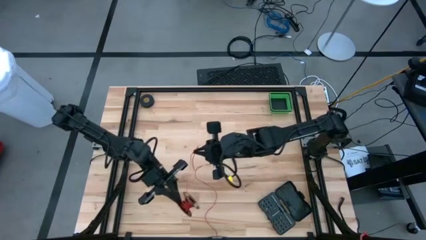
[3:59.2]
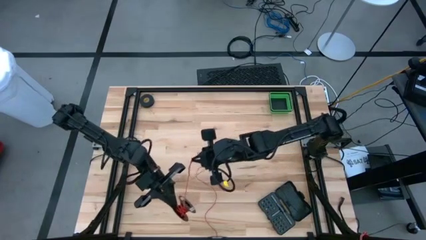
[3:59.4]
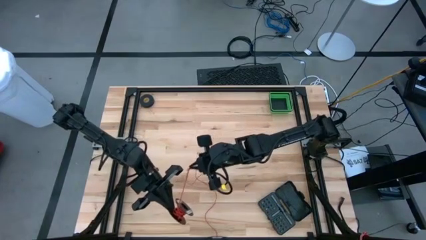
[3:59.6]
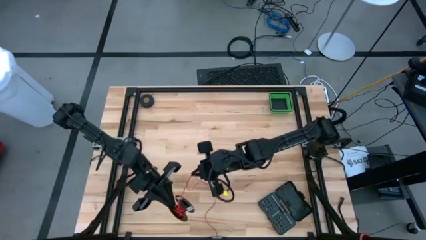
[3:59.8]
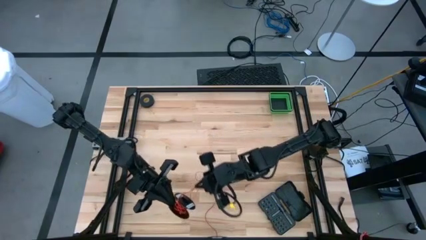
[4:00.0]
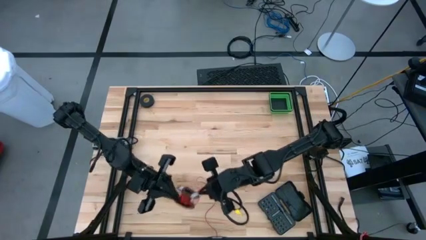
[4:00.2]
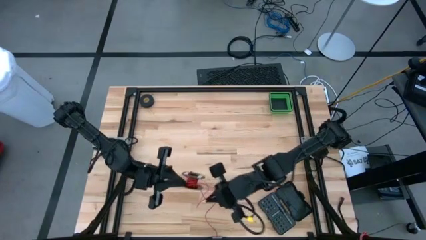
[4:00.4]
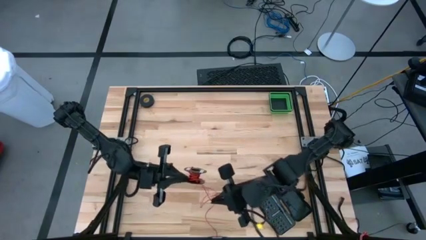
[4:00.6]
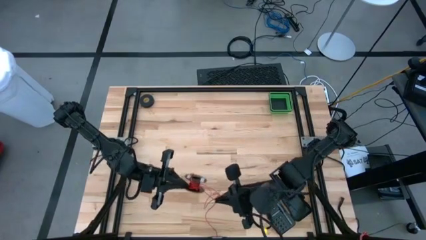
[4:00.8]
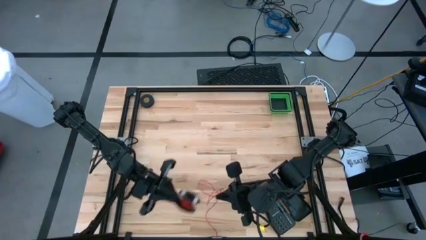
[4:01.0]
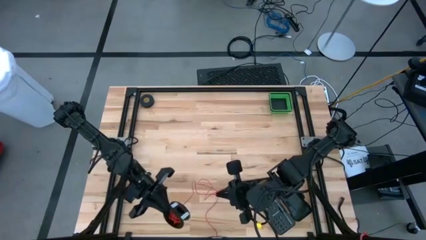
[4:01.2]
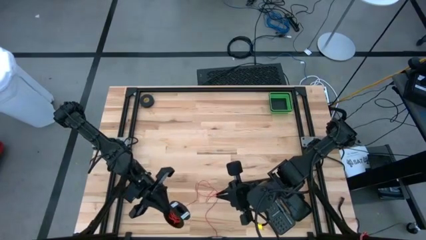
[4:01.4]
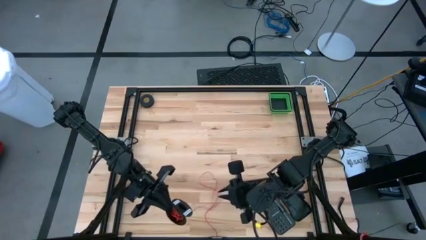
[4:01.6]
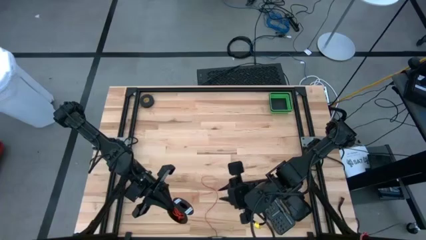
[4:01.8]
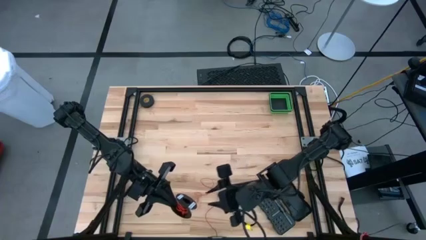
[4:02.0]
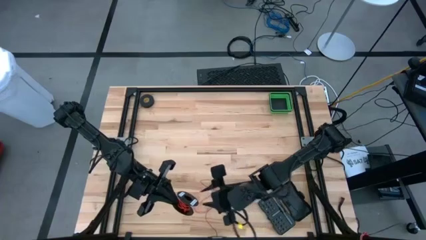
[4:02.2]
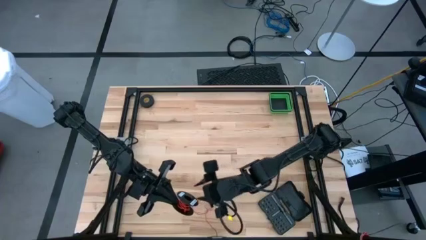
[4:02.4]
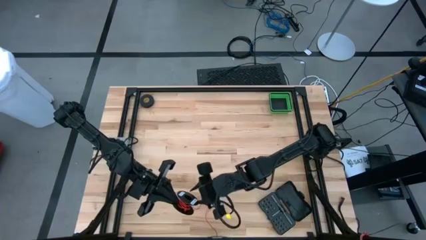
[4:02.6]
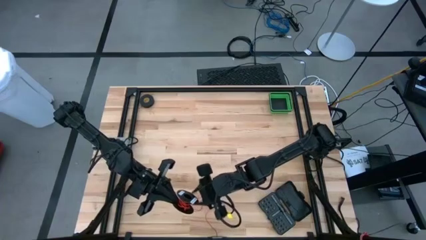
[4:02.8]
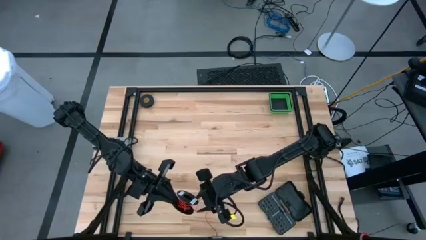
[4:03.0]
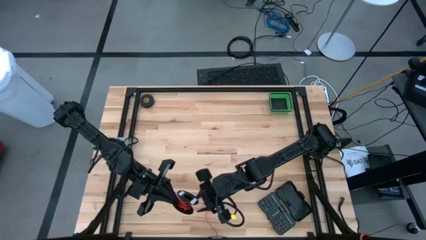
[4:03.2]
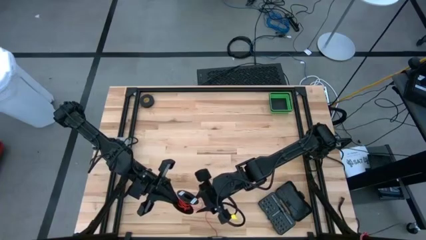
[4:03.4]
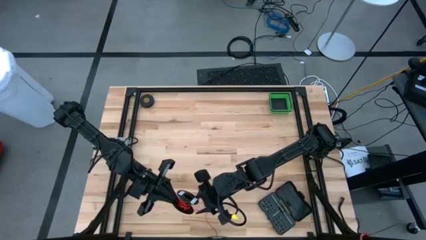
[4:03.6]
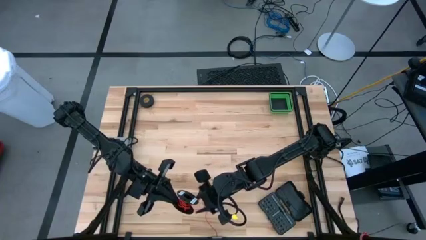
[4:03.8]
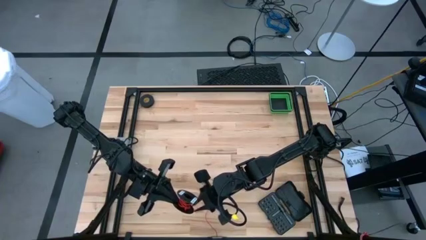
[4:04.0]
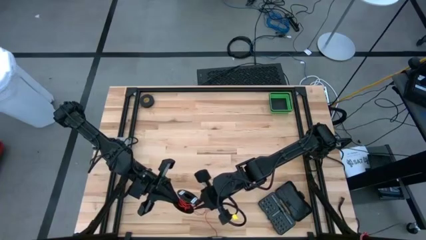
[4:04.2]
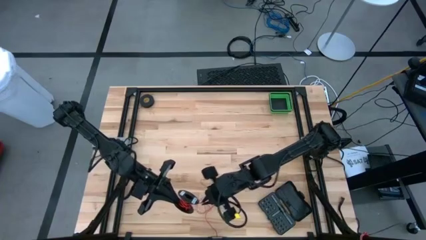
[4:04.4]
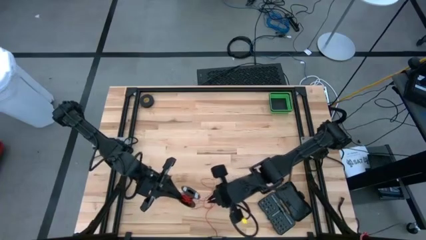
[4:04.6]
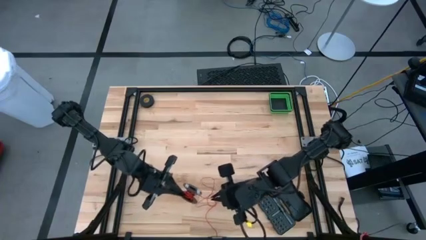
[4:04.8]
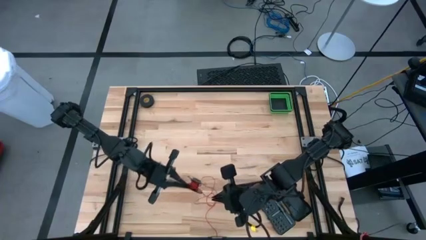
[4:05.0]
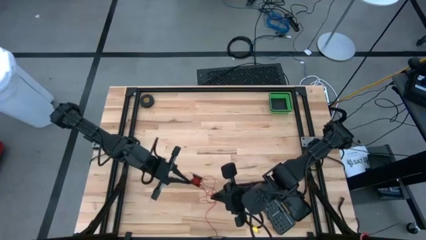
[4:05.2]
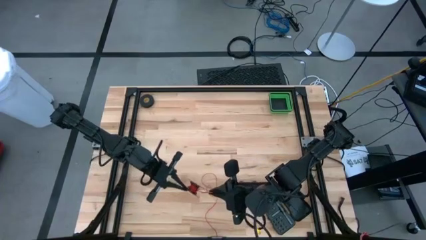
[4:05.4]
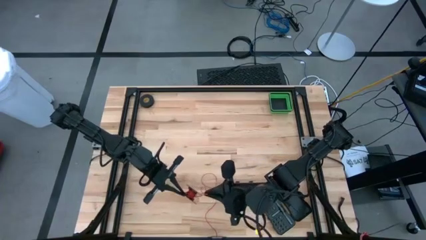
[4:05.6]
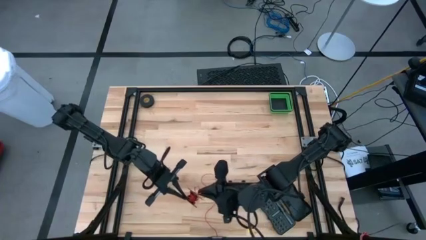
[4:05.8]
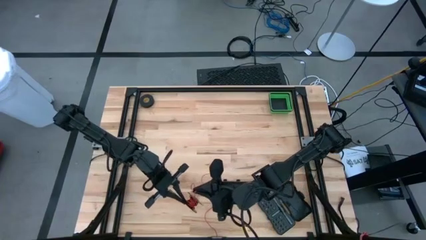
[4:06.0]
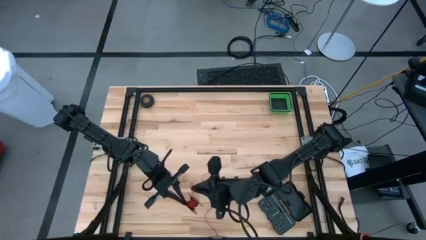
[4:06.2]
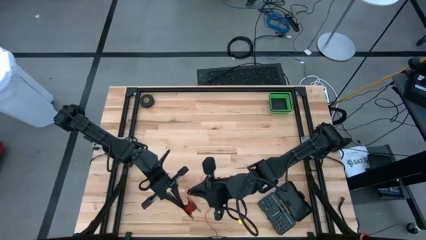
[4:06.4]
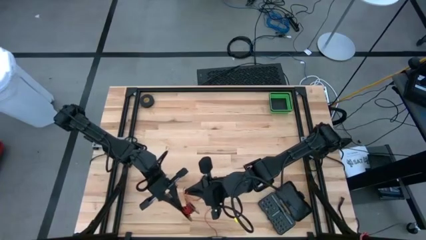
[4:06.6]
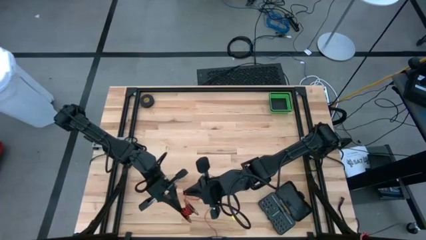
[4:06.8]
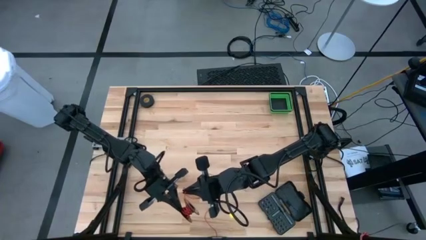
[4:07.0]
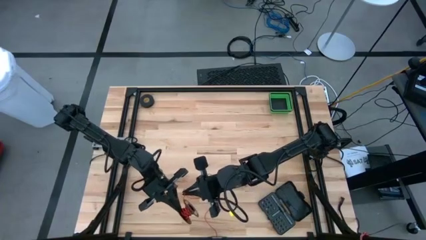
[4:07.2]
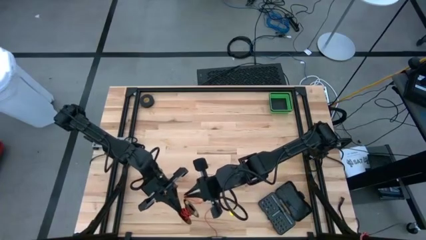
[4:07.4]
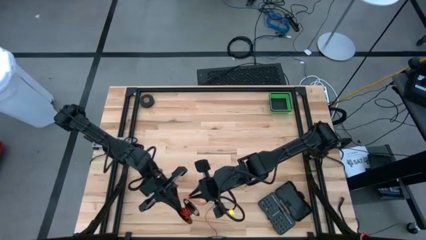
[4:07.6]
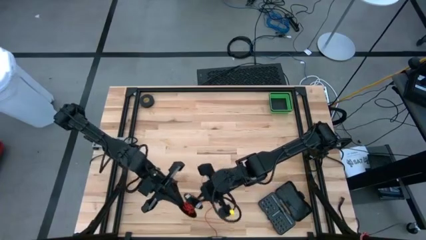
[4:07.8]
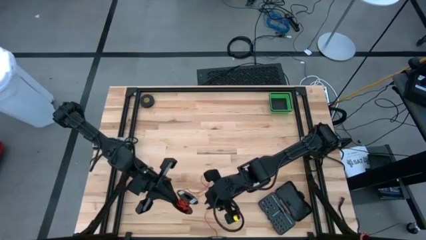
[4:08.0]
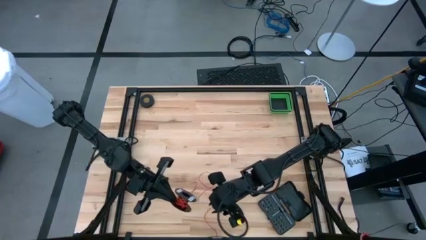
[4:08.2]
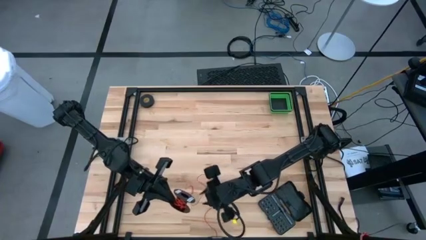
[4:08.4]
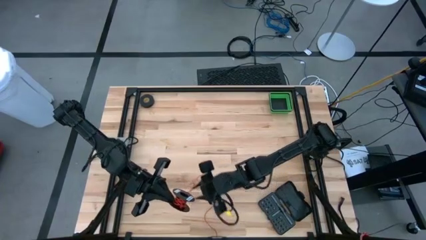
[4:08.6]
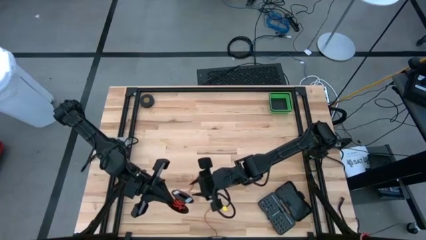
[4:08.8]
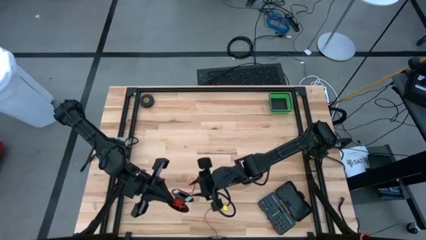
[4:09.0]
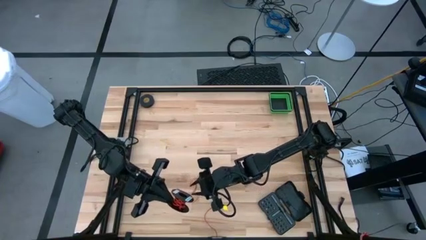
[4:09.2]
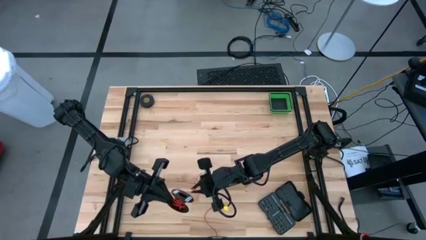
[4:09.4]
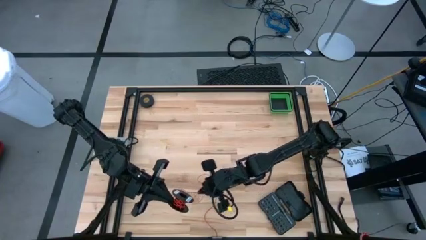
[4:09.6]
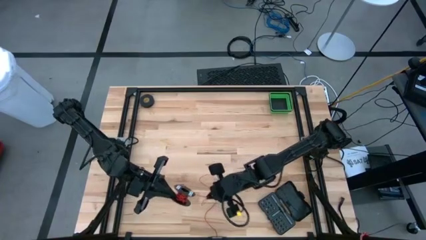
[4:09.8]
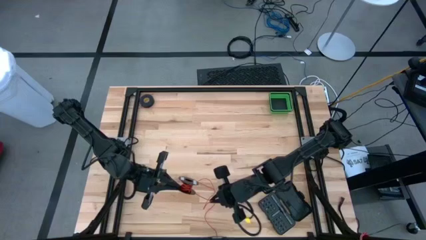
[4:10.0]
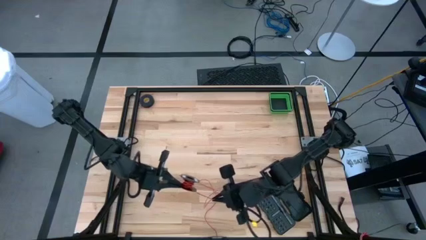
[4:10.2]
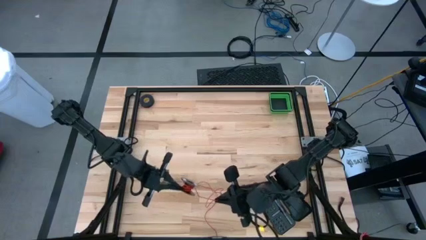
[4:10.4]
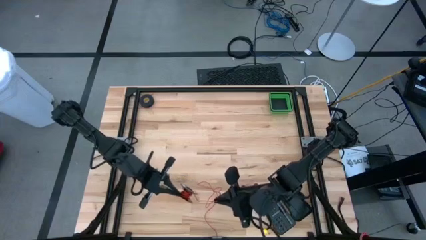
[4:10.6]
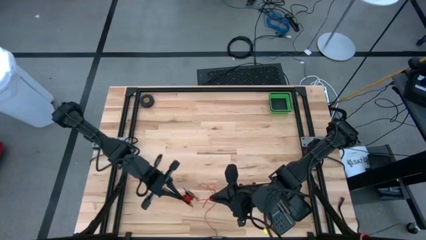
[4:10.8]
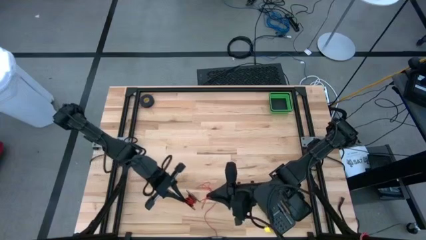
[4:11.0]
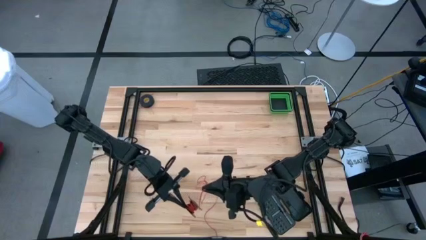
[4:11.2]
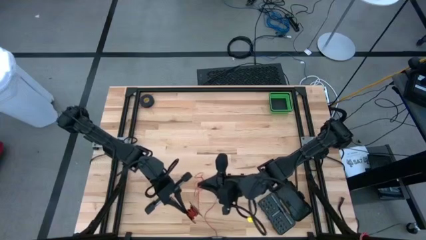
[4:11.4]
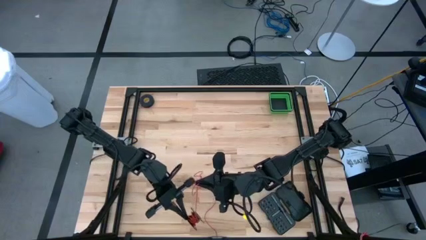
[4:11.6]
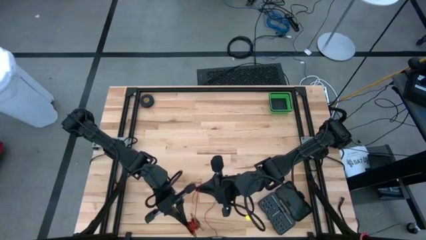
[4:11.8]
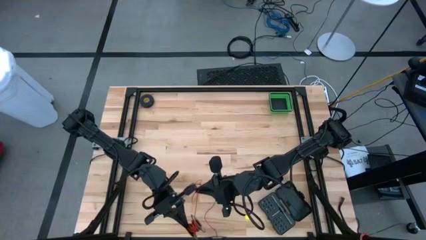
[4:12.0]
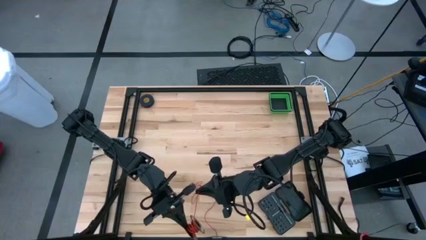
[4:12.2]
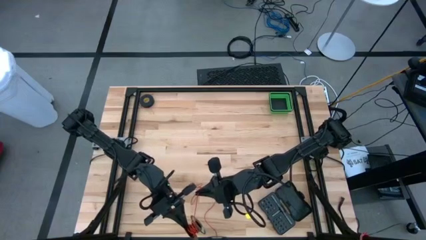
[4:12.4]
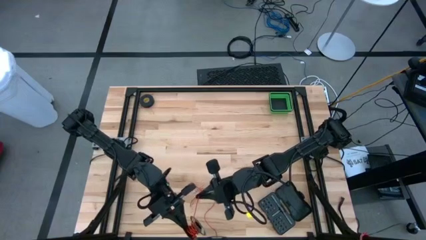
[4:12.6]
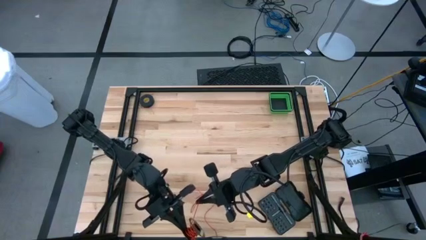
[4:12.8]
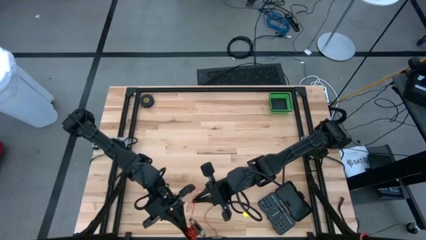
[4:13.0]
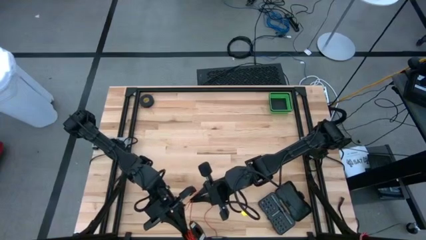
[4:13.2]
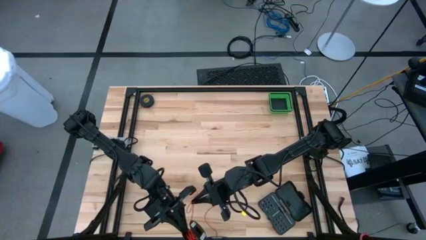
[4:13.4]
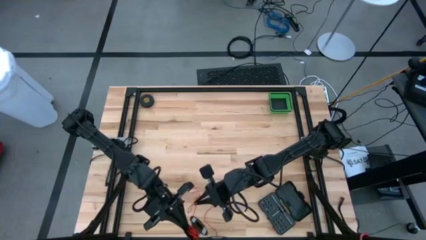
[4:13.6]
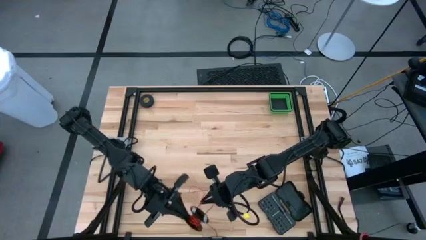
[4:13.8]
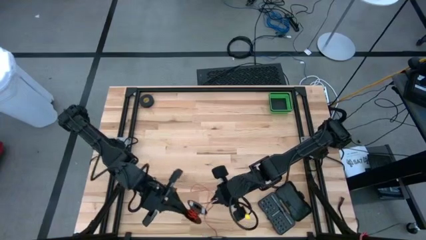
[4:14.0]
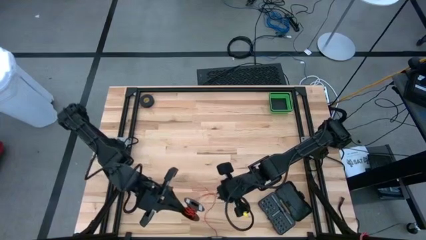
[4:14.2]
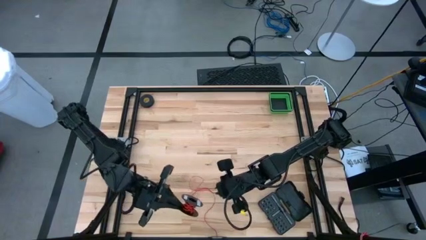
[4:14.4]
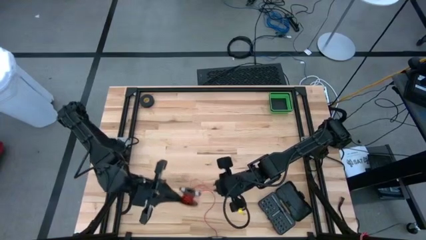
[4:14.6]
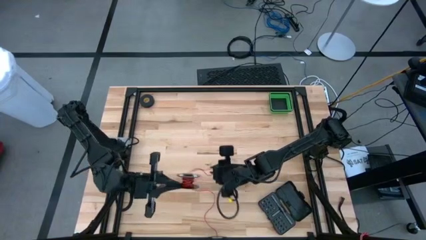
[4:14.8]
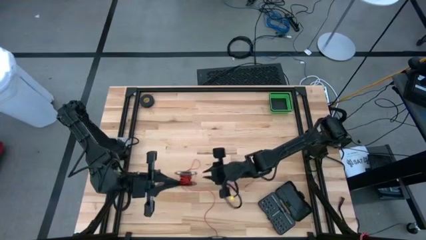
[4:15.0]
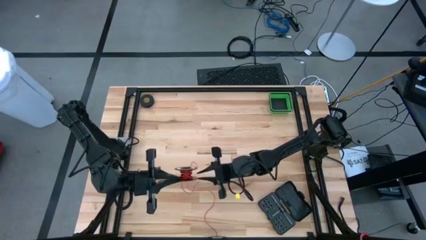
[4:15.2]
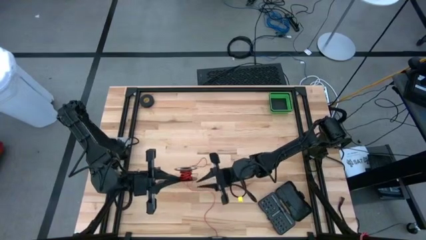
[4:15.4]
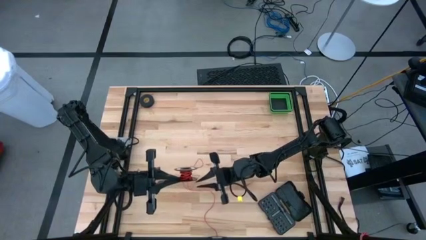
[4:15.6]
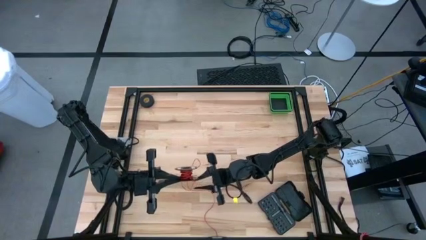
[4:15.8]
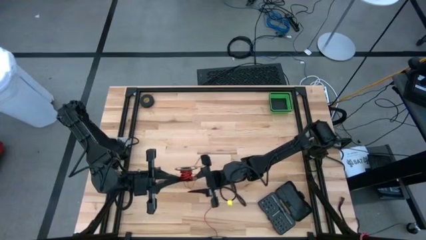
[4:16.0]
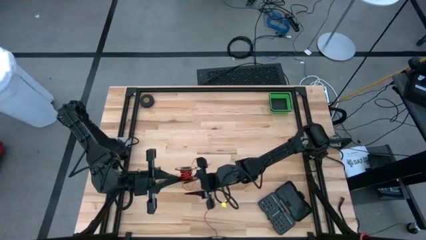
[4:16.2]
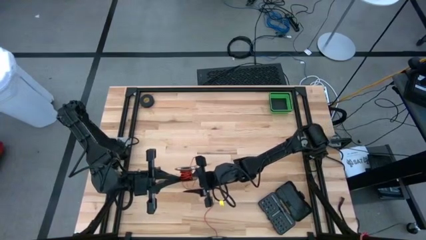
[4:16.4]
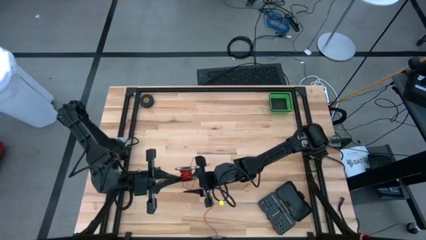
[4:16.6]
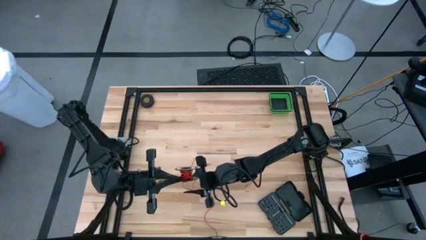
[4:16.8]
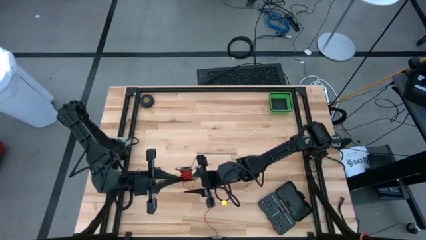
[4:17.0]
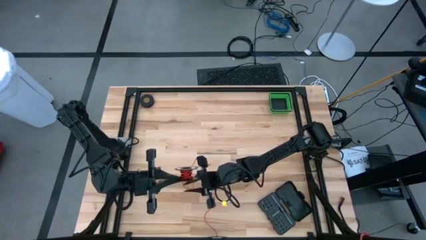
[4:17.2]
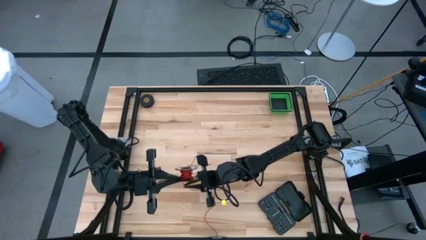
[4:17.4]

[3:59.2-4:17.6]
Task: Coil cords
Coil the red wire on the black spool
